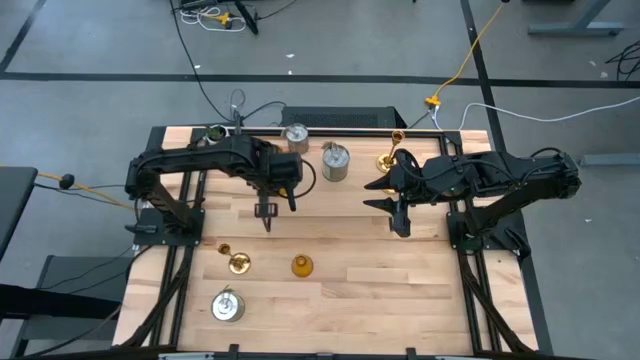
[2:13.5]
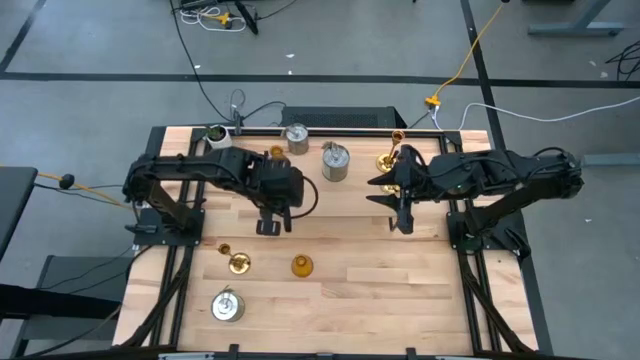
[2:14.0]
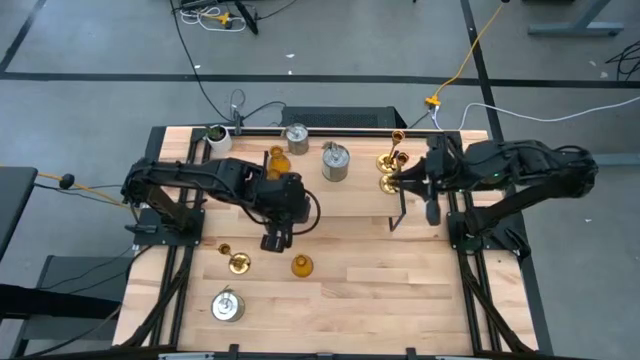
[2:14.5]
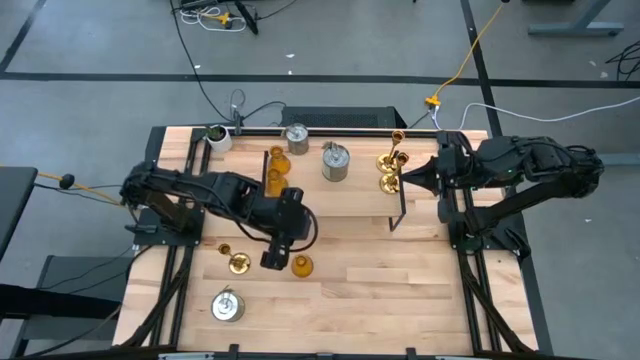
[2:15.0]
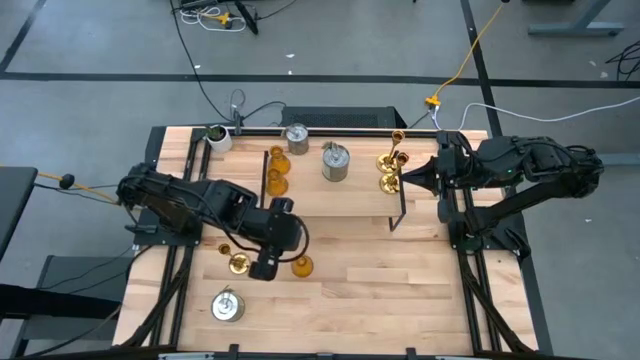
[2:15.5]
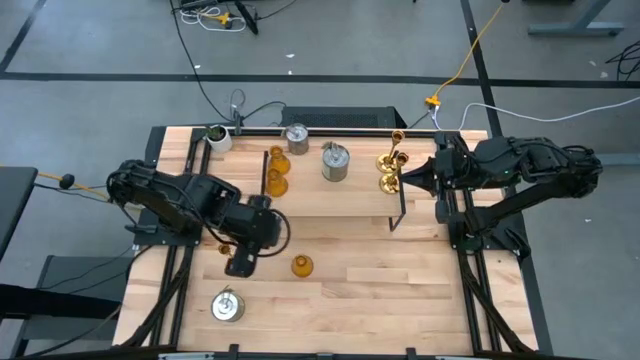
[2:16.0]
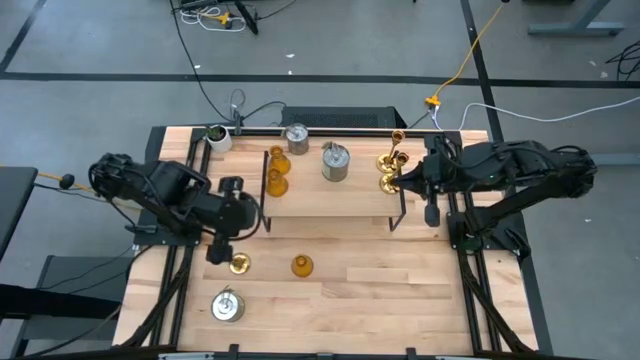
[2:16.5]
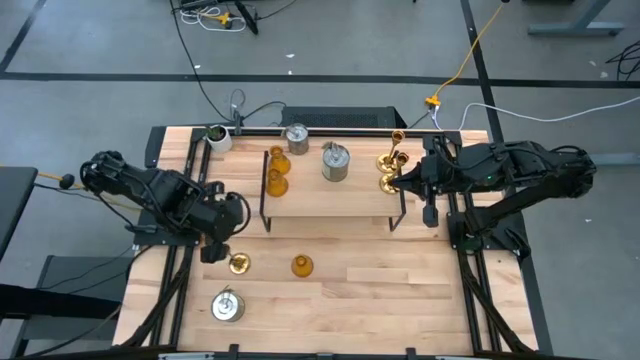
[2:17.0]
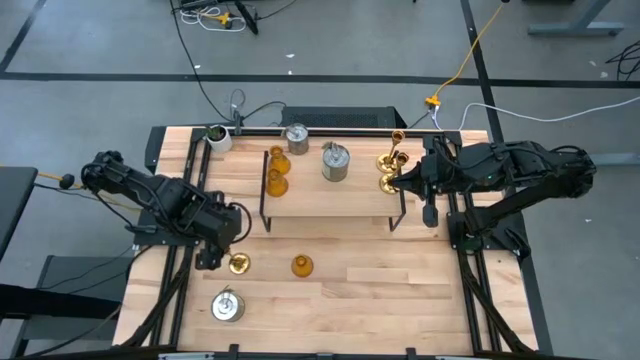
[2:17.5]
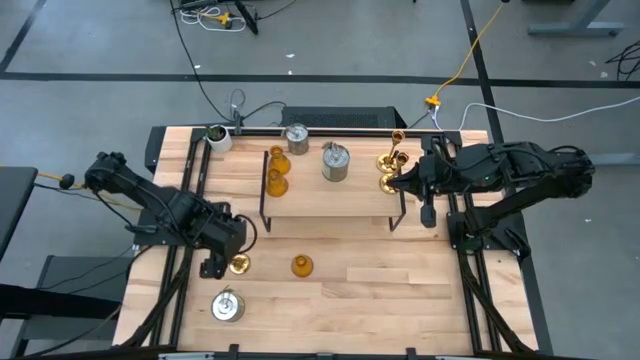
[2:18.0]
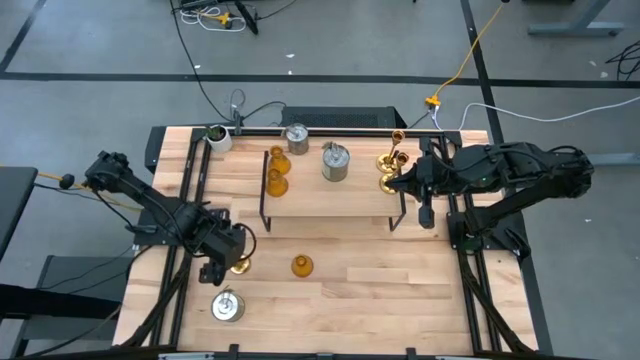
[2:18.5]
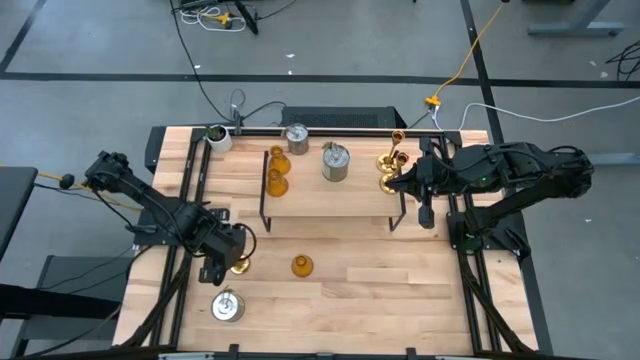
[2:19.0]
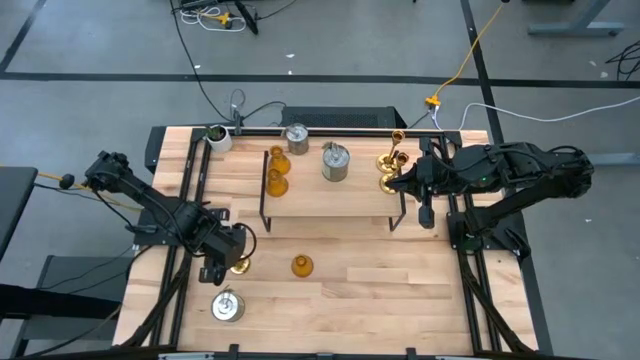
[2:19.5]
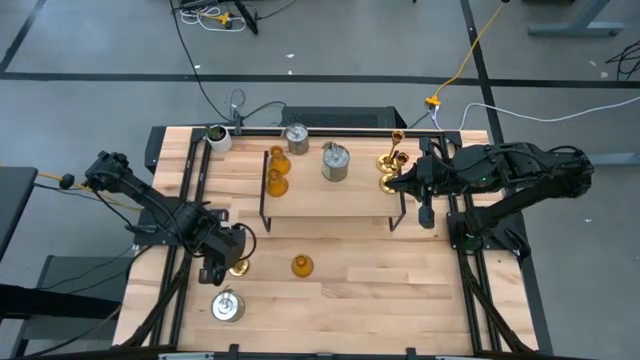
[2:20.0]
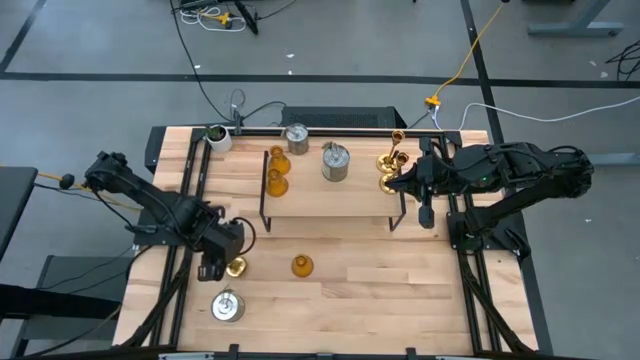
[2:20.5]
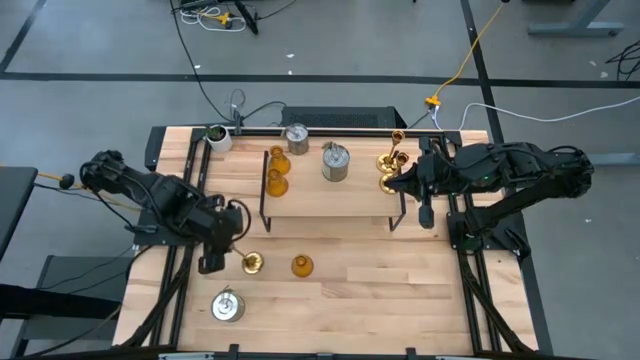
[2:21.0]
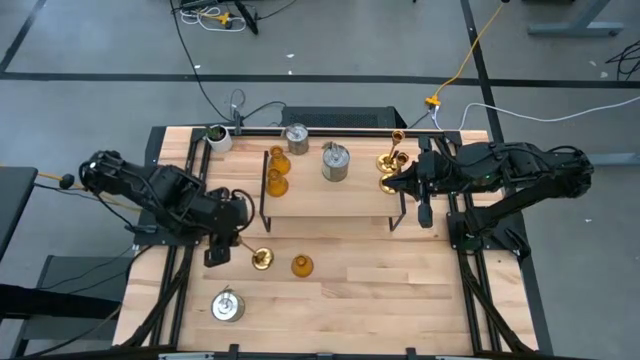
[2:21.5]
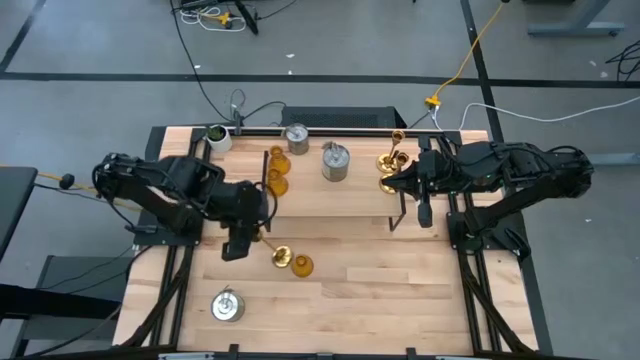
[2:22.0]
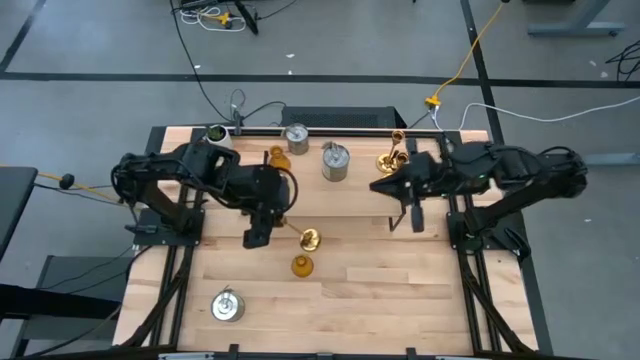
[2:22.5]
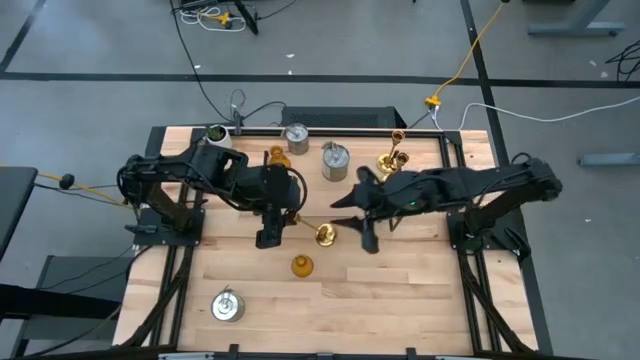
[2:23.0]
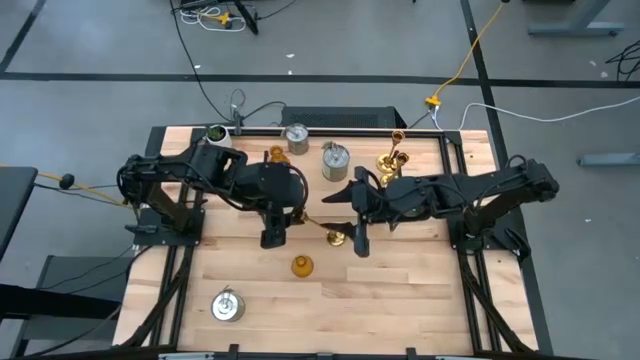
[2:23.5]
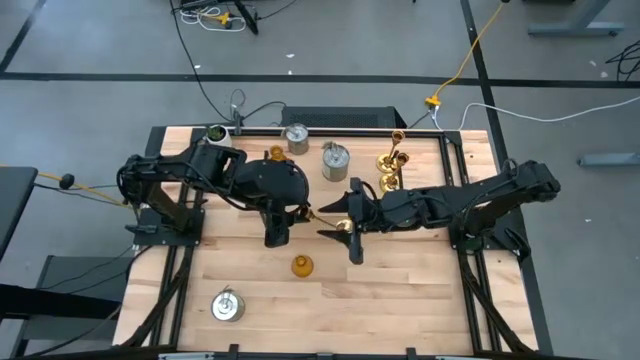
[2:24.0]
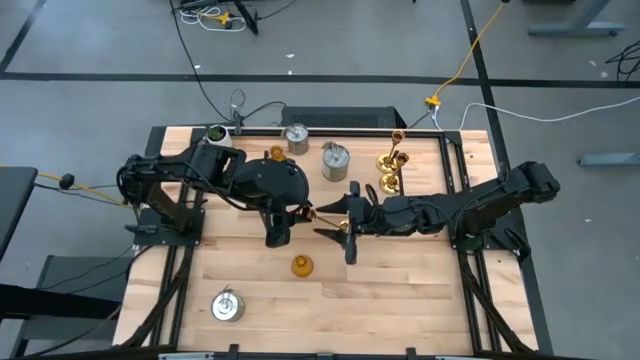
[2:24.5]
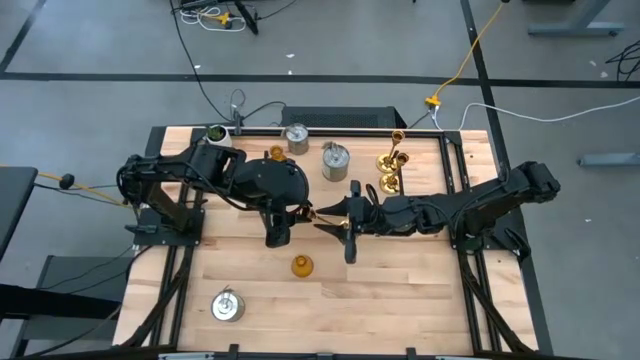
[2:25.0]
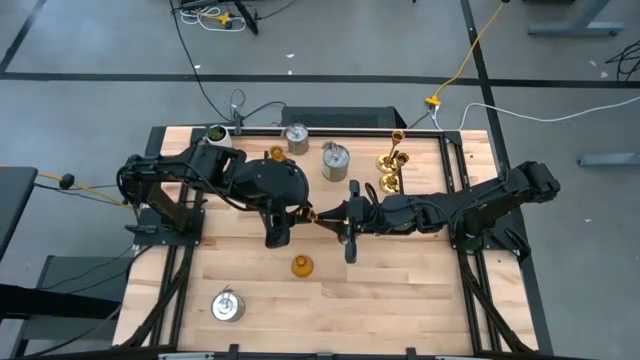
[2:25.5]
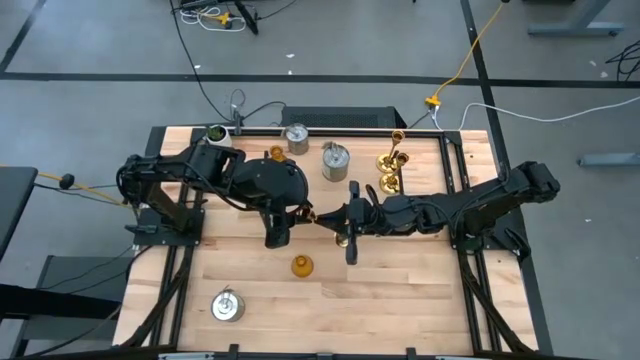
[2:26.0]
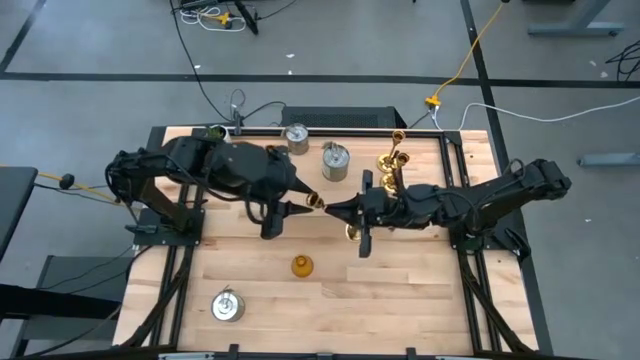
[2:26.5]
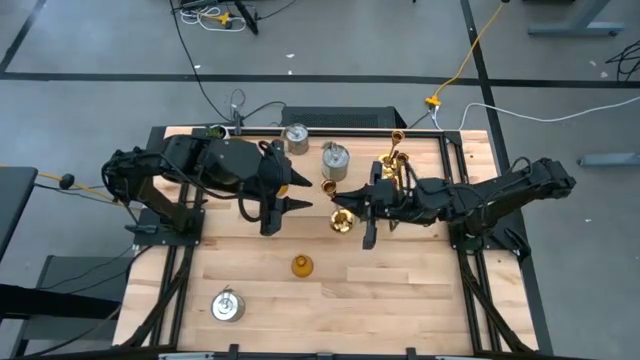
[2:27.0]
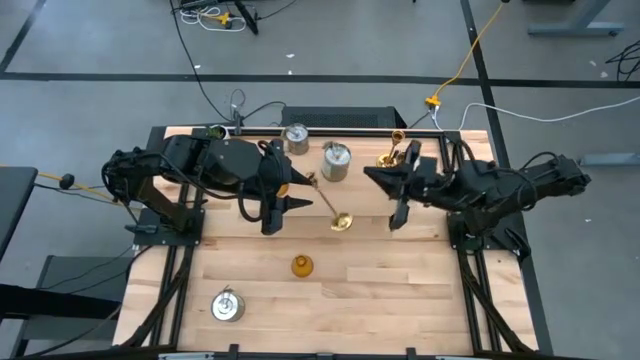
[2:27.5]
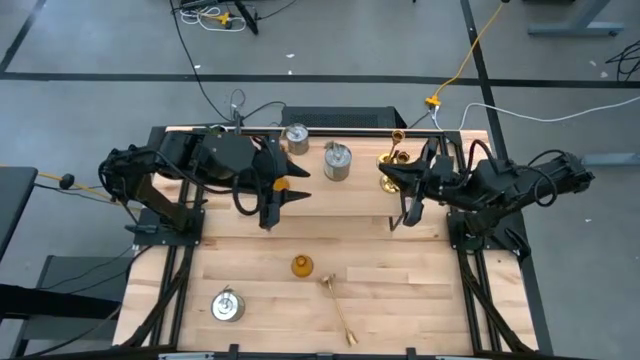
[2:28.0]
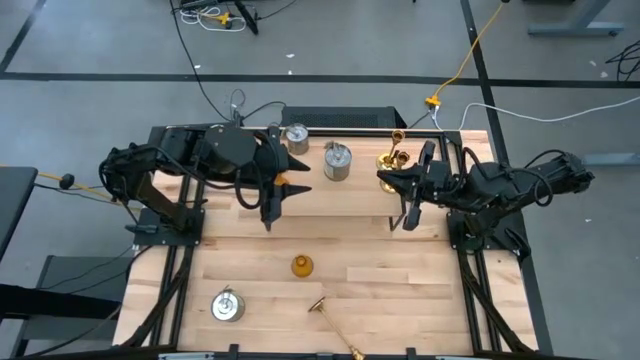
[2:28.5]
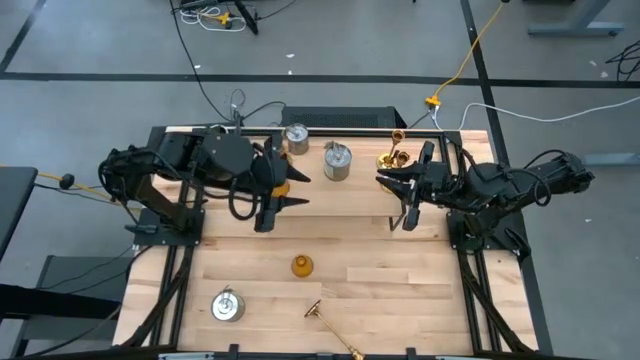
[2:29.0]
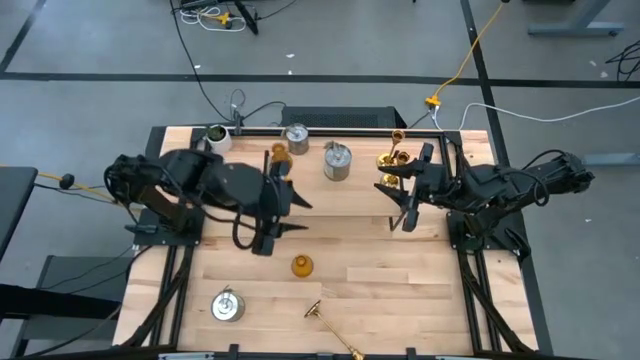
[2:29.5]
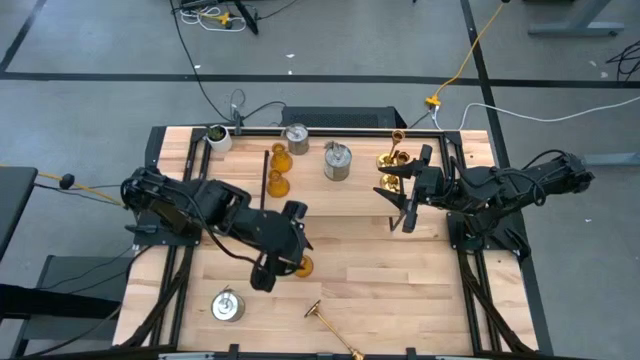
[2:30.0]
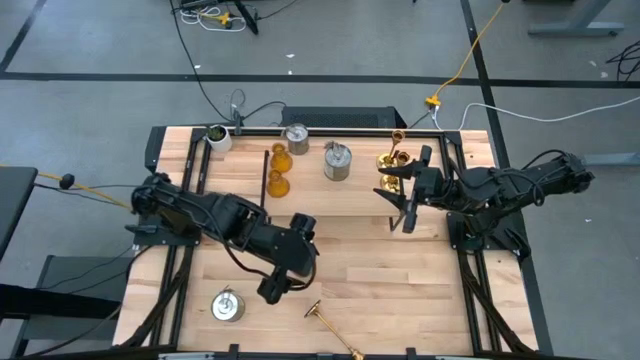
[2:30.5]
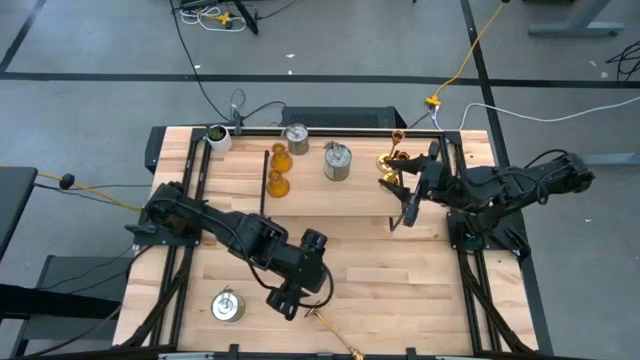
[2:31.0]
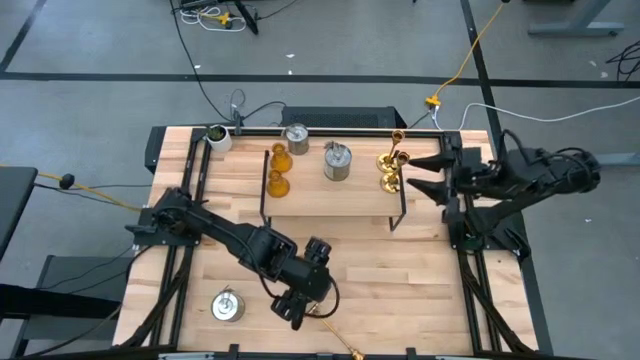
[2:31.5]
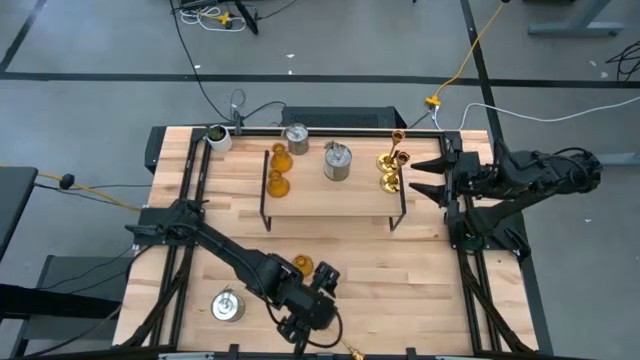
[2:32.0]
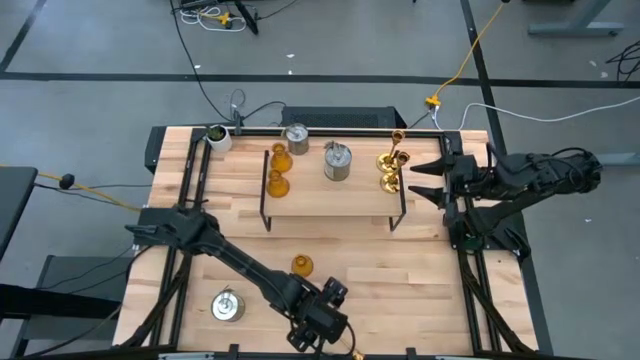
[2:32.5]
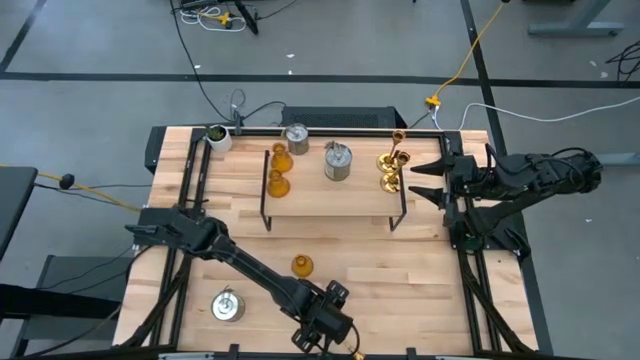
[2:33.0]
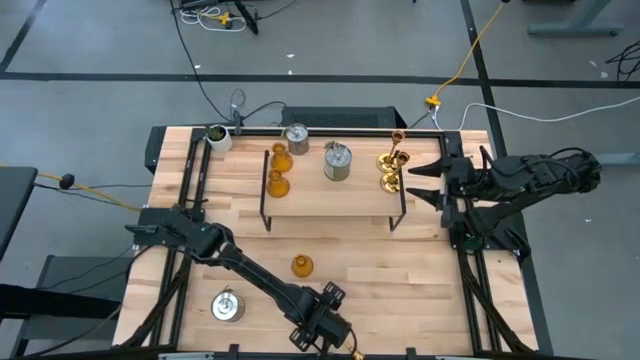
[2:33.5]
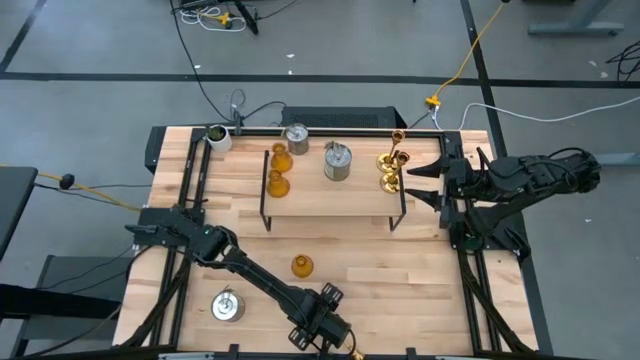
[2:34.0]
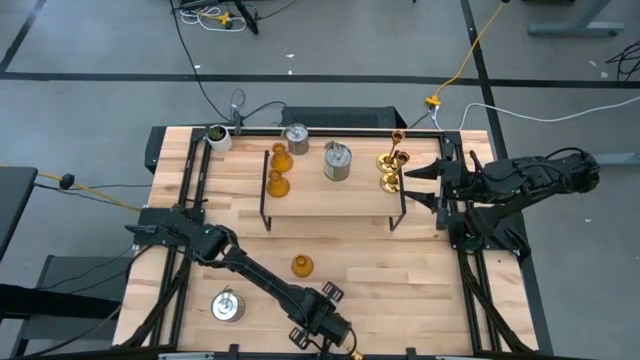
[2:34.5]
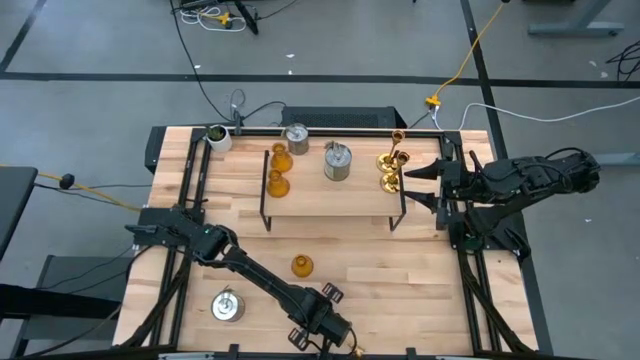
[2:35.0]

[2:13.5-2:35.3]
Task: Pick & Place candle stick holders
Put the candle holder on the shelf aligned with the other candle holder
